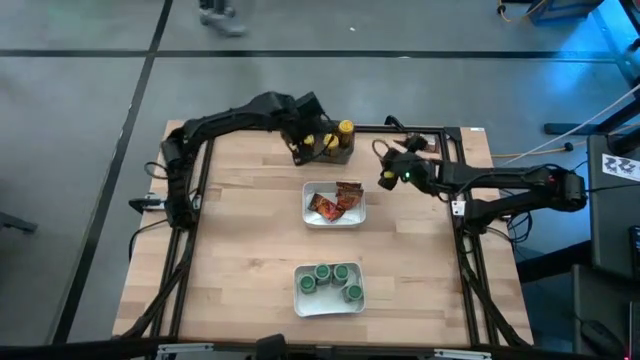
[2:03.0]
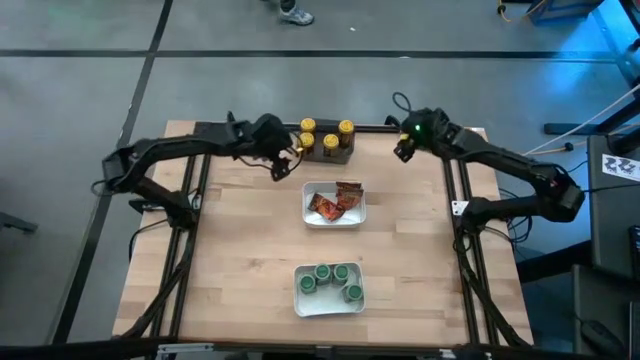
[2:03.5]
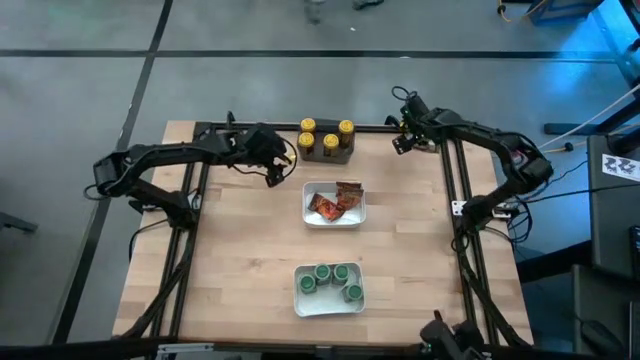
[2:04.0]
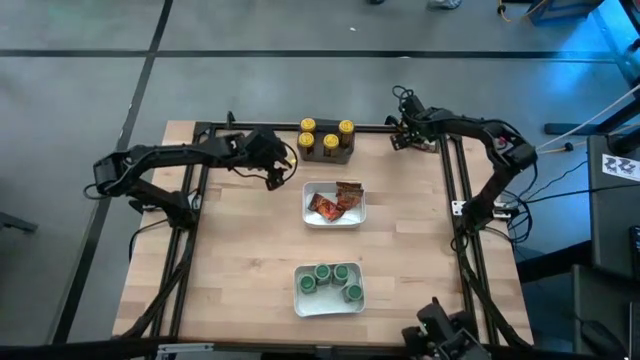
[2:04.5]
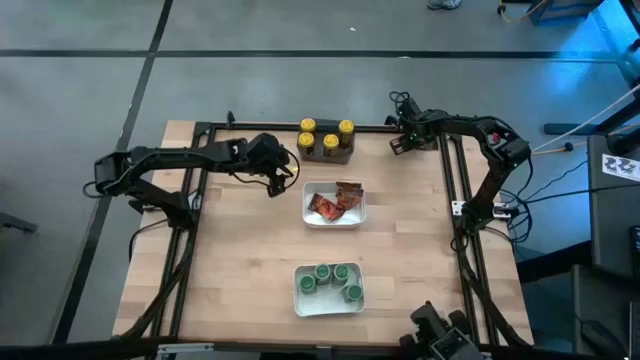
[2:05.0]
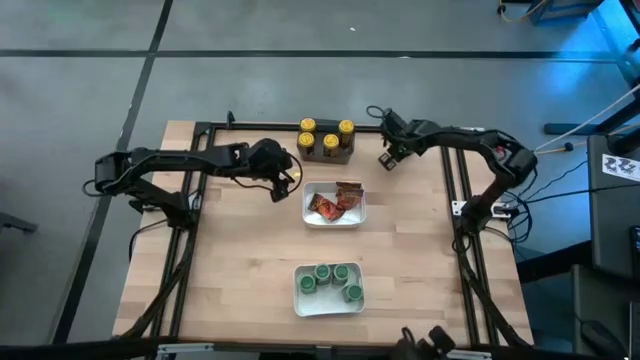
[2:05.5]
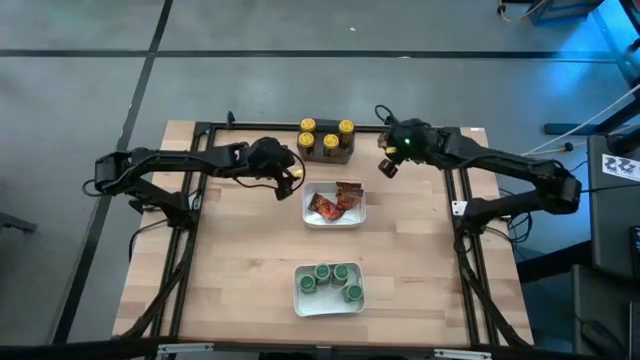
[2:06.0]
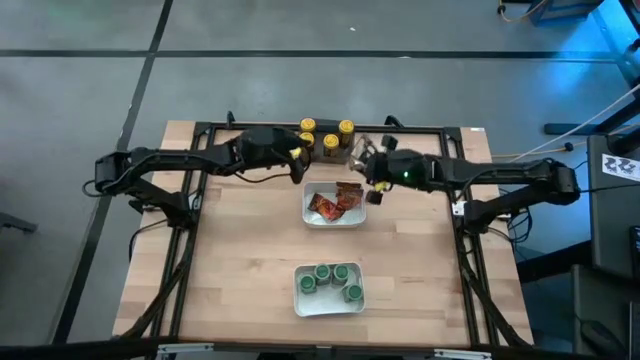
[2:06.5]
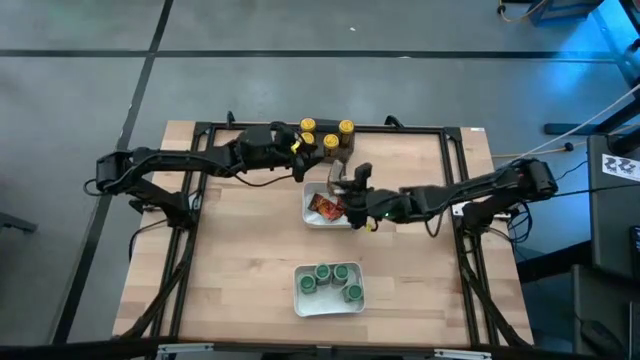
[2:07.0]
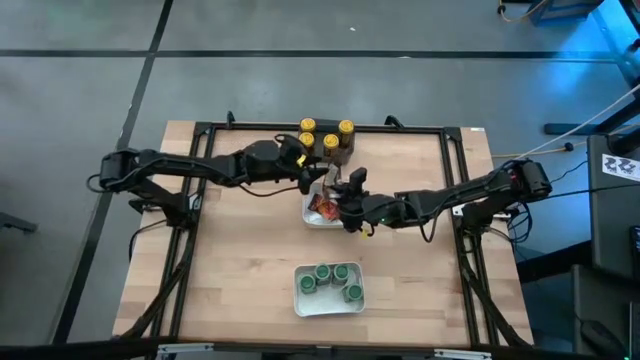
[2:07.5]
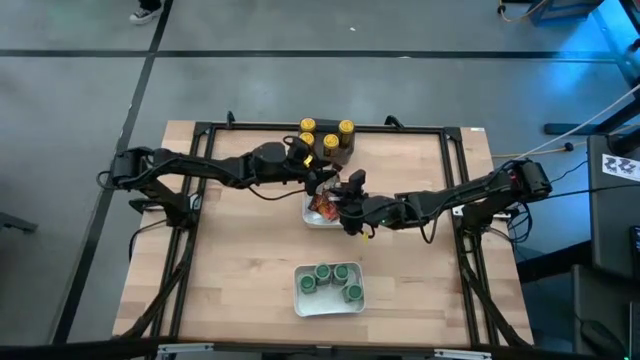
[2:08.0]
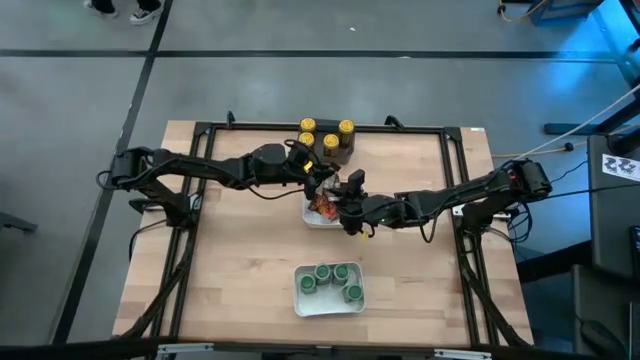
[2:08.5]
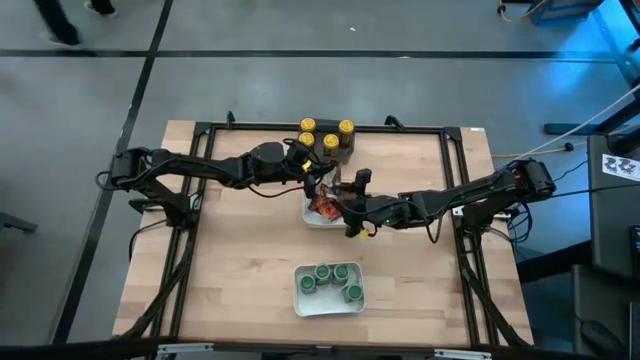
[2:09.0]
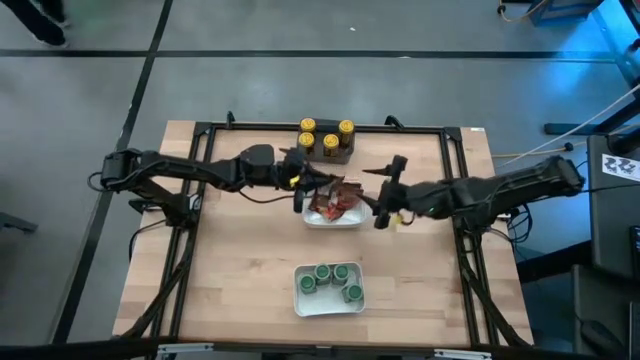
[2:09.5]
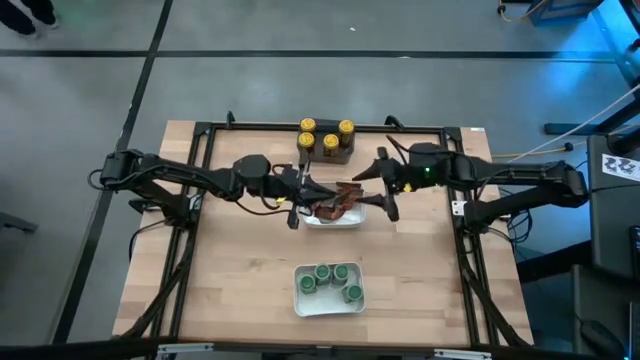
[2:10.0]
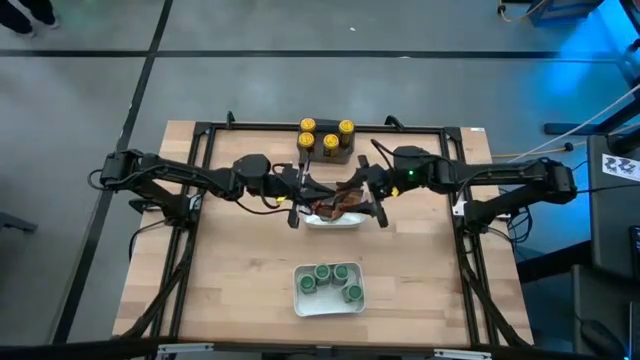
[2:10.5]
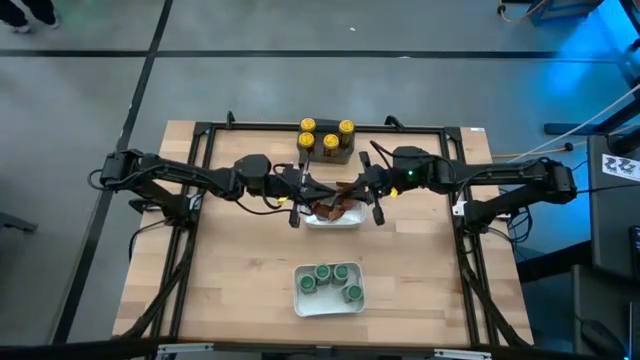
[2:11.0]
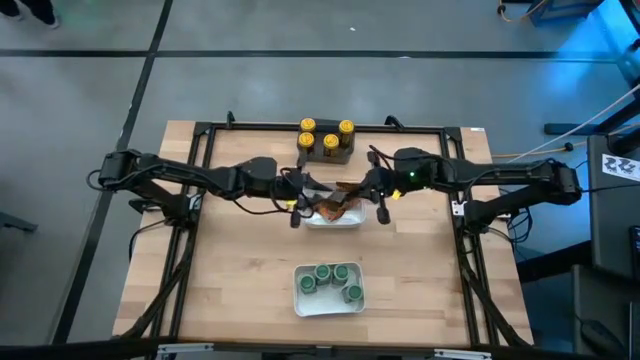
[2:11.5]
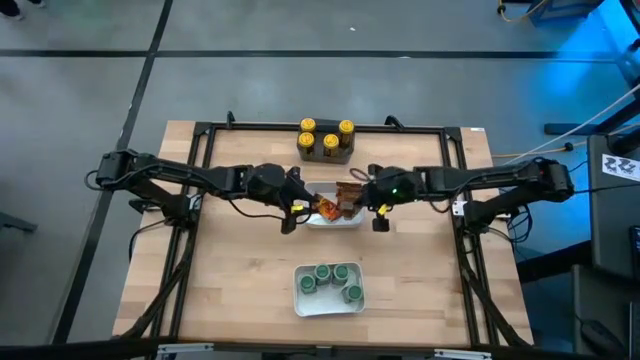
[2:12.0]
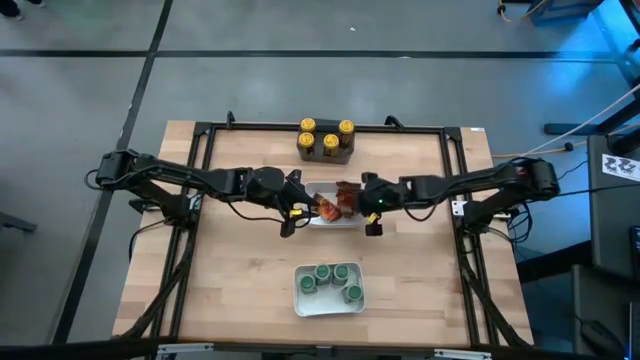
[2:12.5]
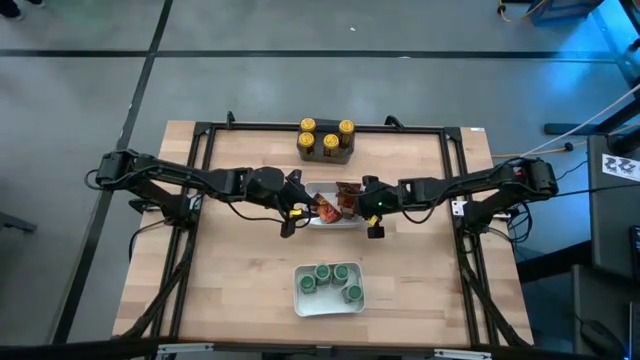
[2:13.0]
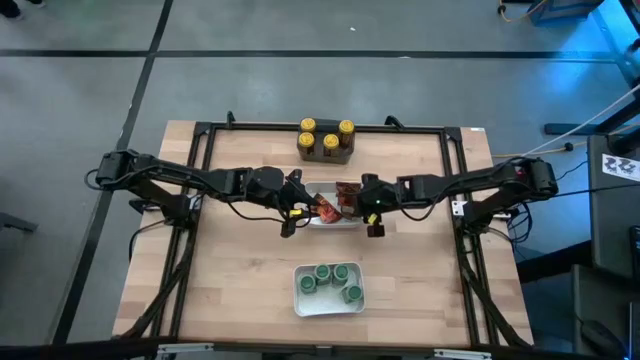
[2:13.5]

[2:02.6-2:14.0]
Task: Sort spices by type
Put the orange seasoning bag into the top white bin

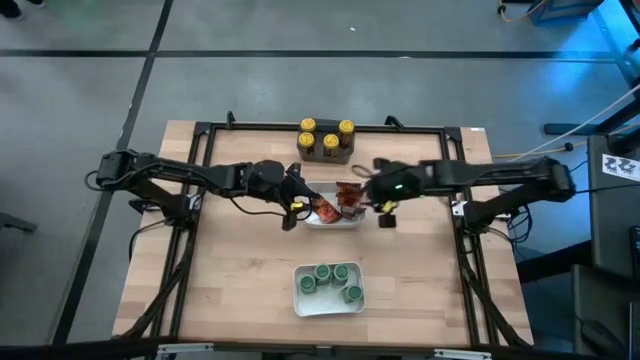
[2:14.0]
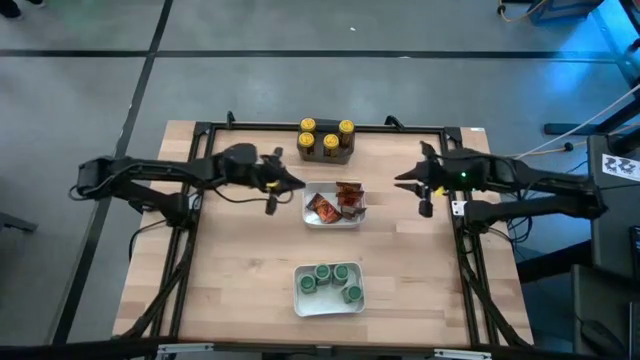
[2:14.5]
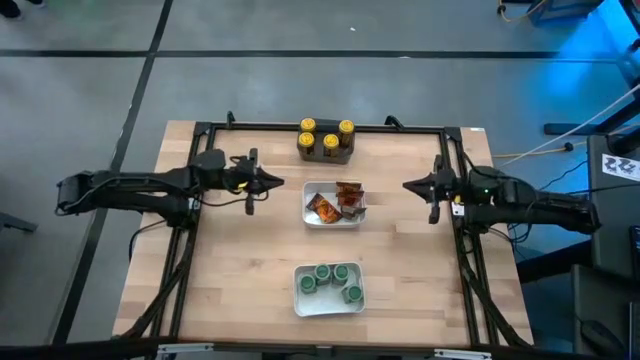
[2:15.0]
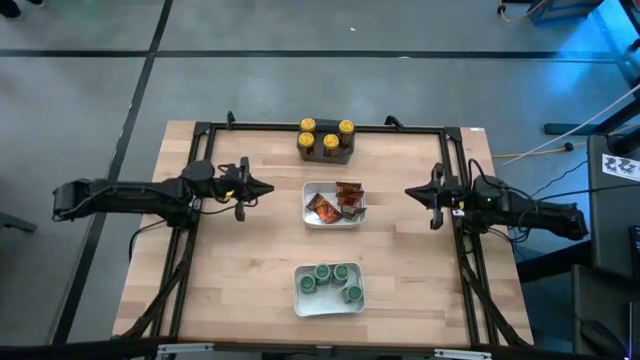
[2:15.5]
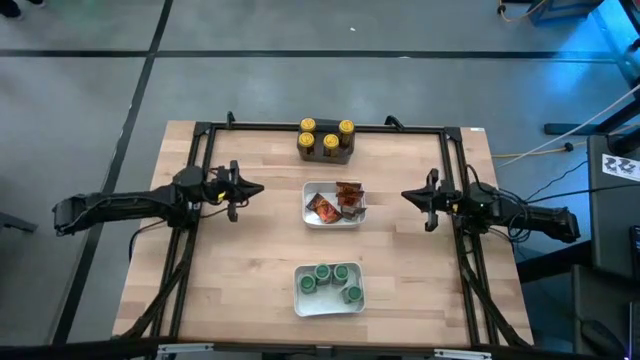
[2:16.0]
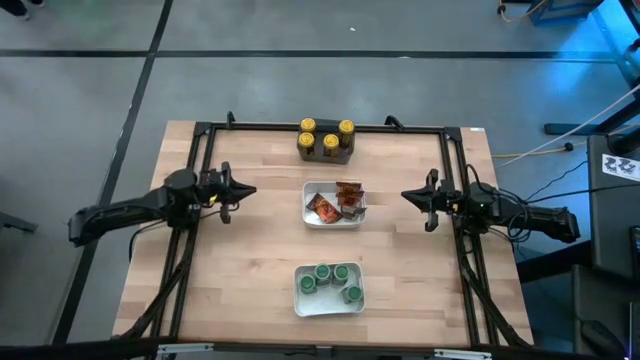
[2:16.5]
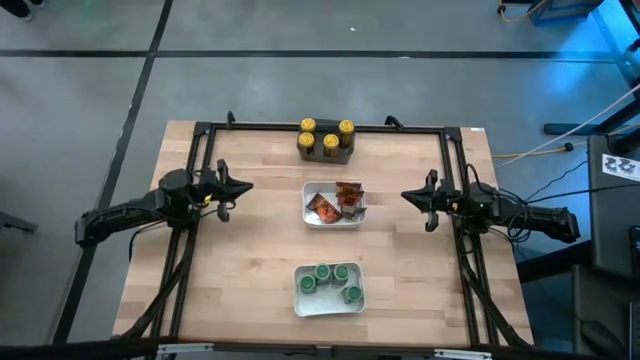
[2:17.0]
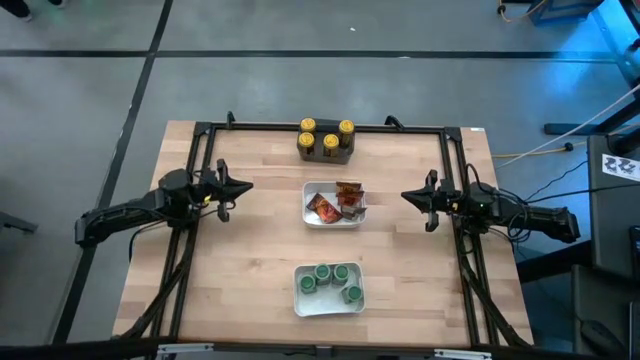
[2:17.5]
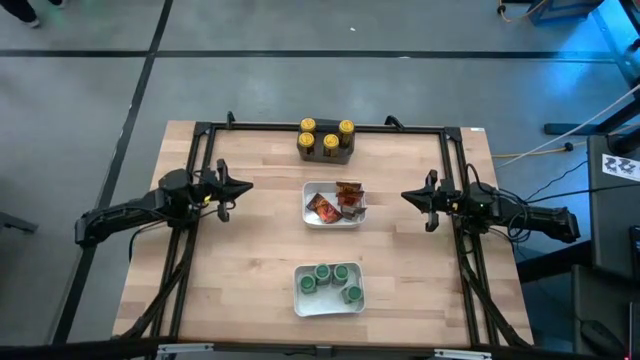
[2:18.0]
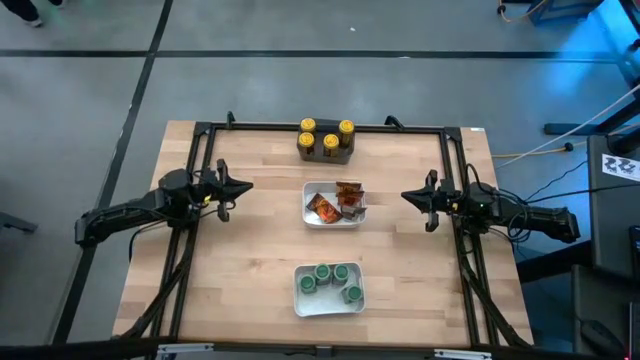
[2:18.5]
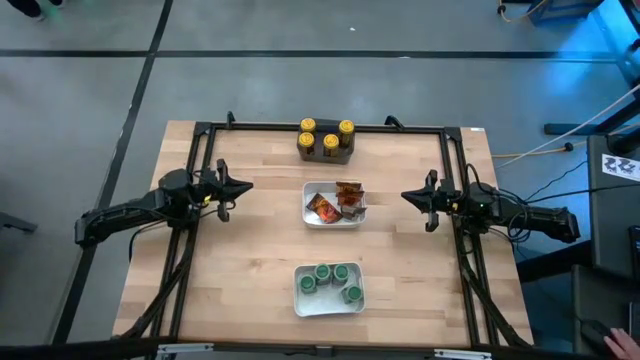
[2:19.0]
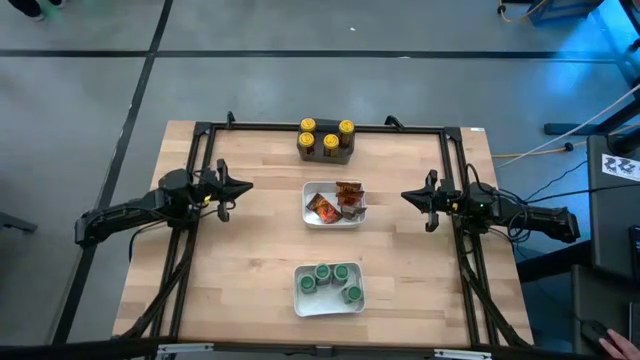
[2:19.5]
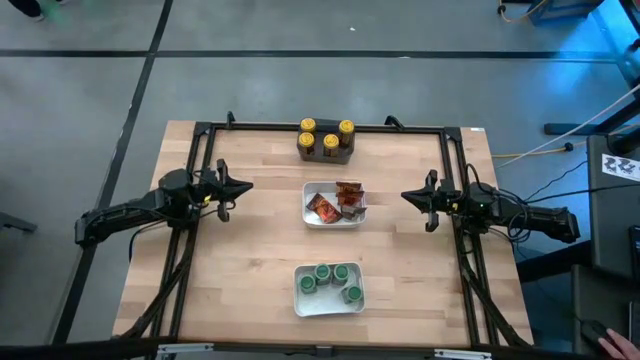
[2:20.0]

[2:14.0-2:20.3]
Return to Home Position

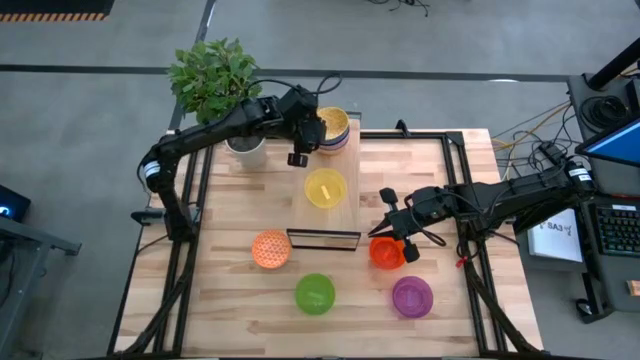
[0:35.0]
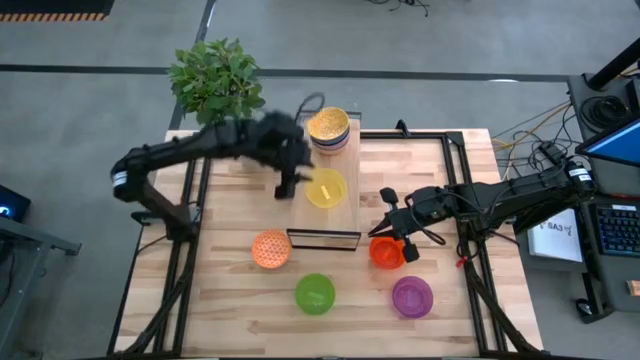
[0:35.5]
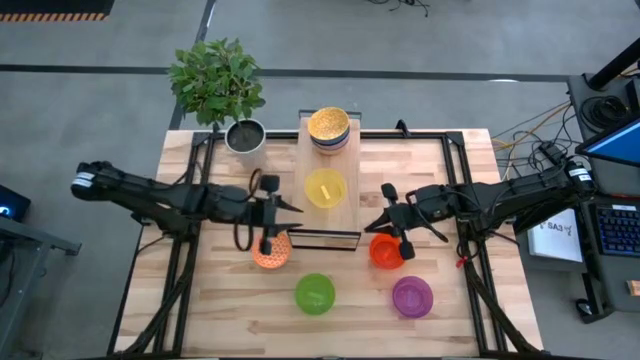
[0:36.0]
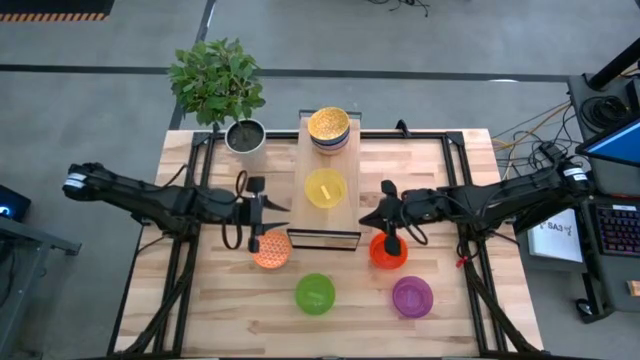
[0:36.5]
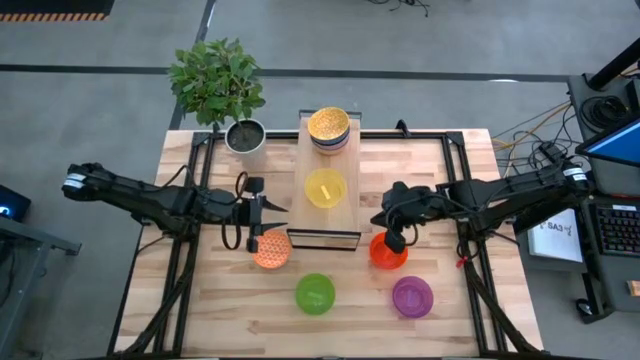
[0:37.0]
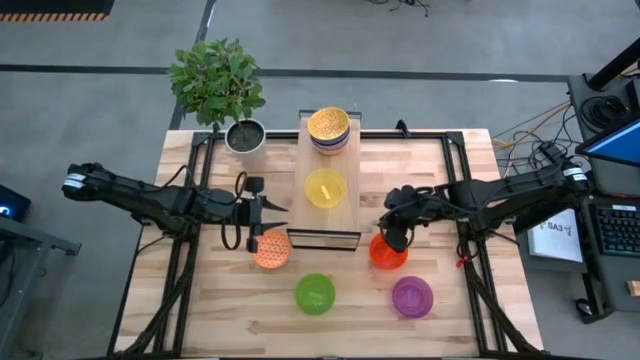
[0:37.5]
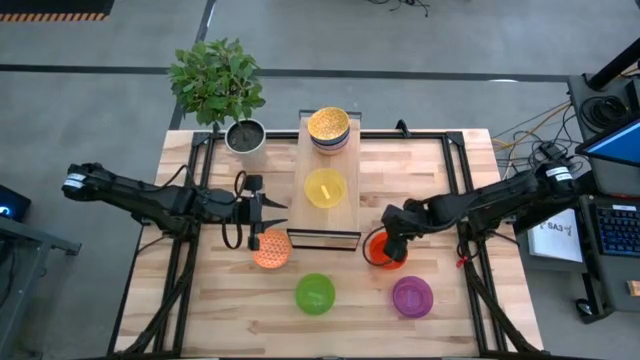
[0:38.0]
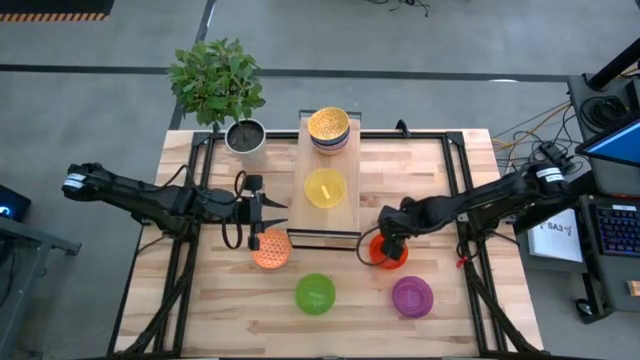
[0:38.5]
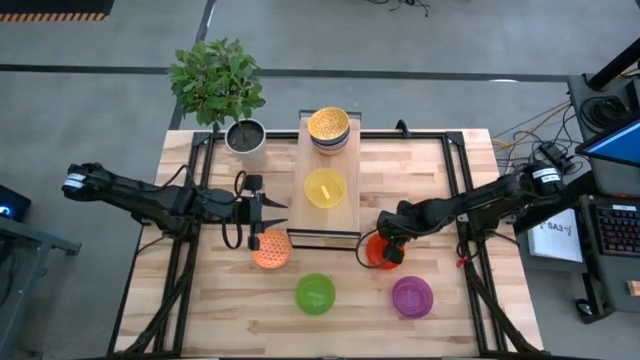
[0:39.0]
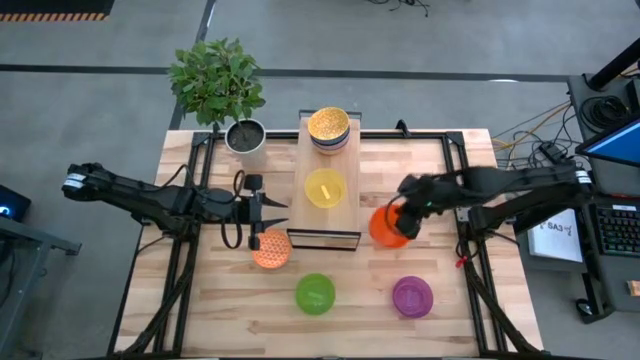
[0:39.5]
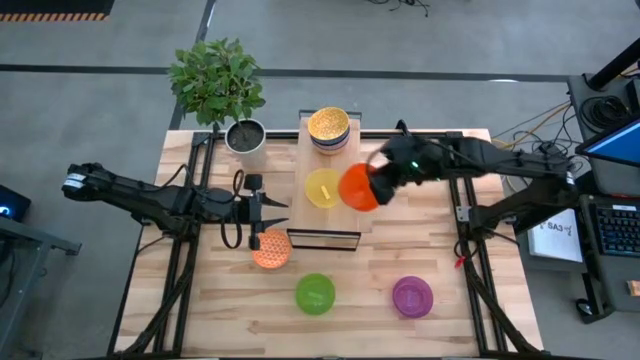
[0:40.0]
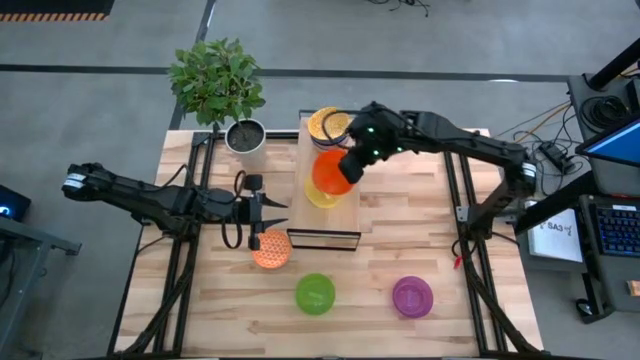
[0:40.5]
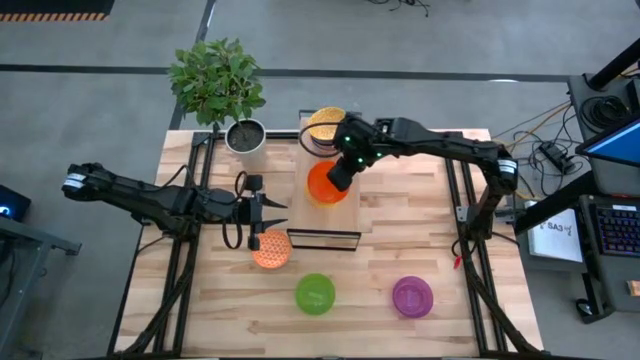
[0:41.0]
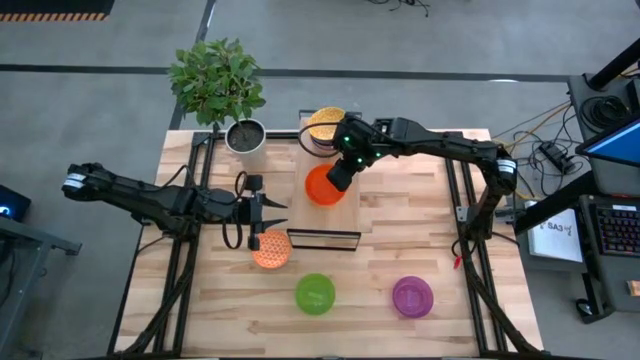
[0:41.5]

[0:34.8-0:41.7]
Task: Place and stack bowls onto a shelf
Stack the orange bowl on top of the yellow bowl on the shelf
